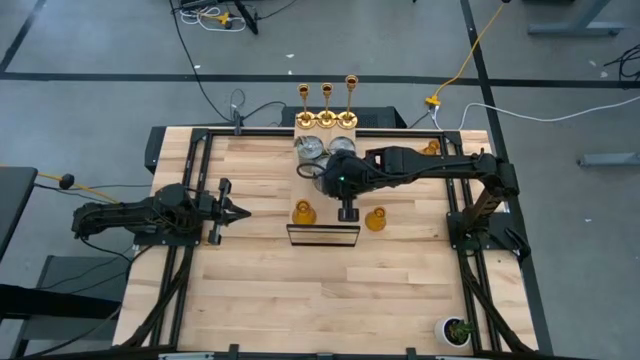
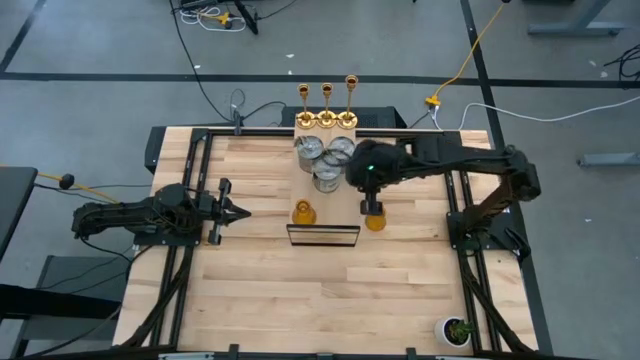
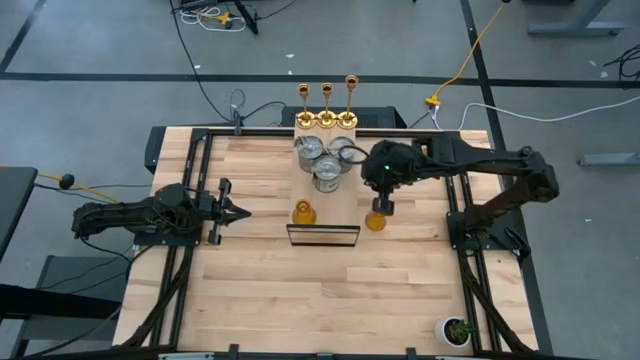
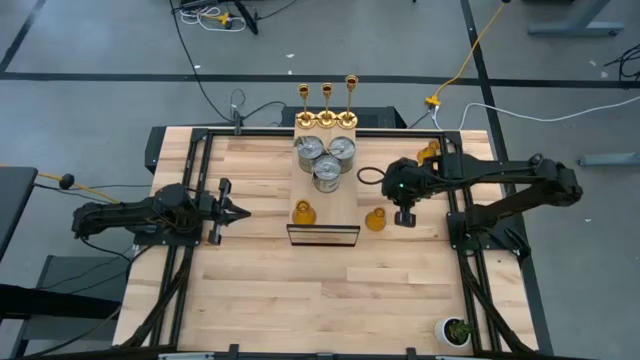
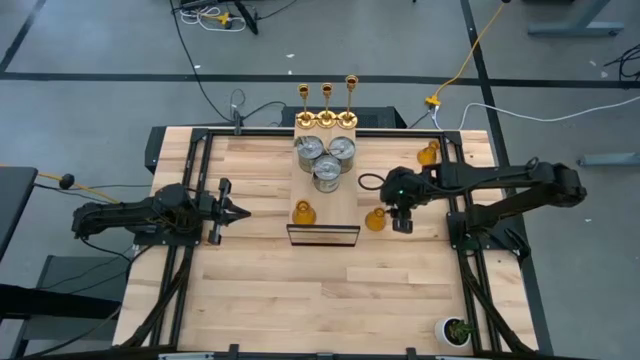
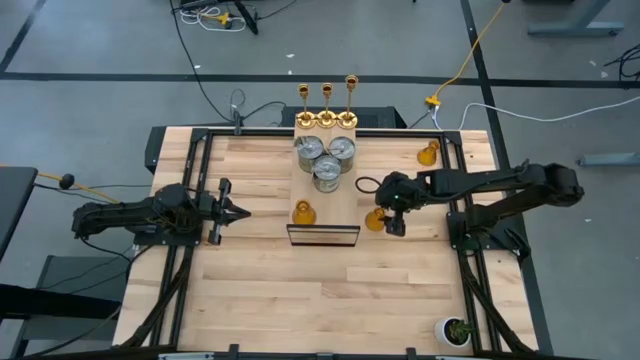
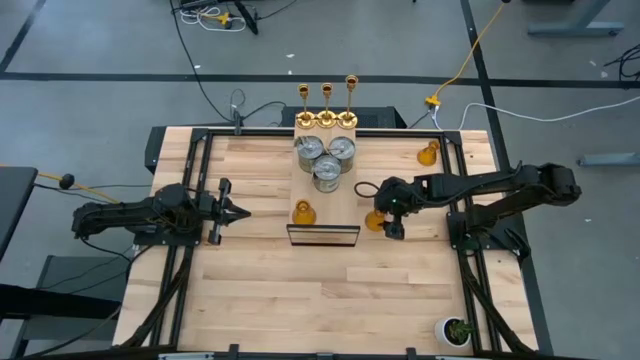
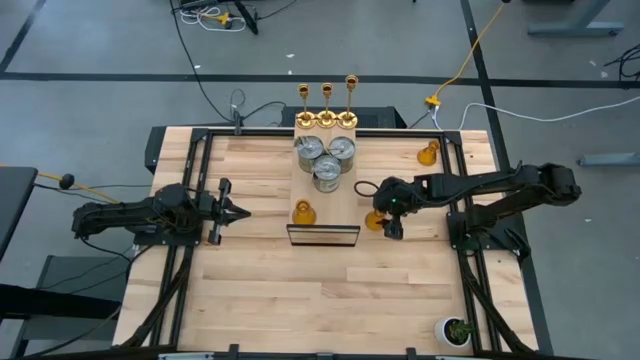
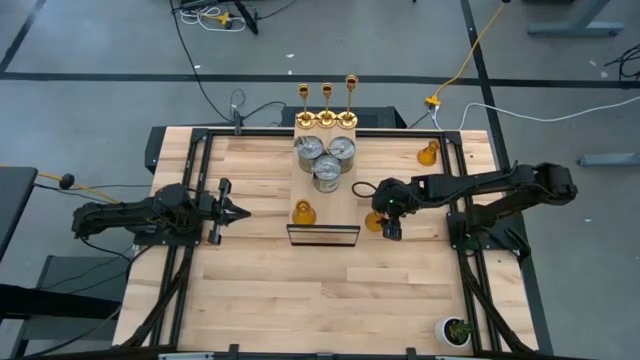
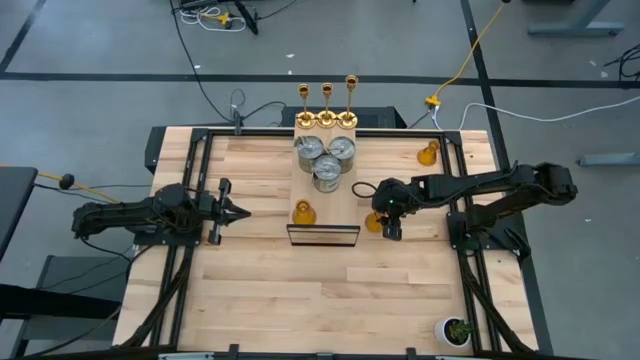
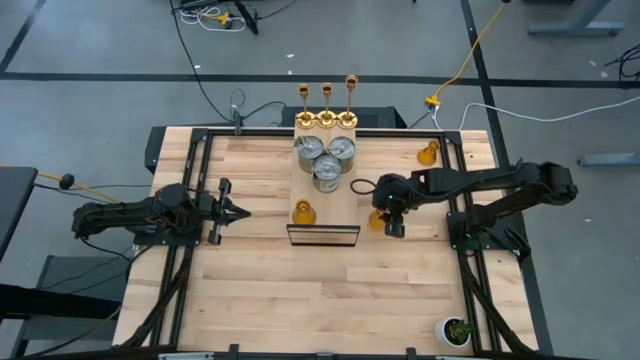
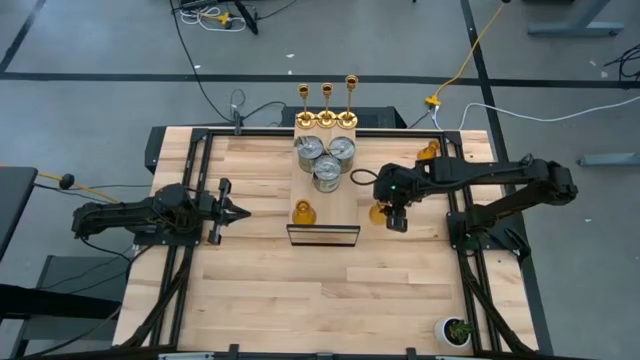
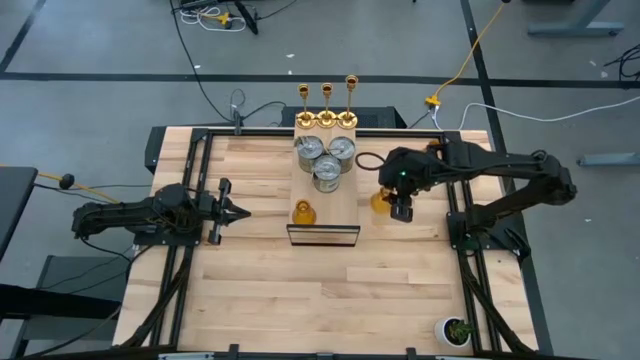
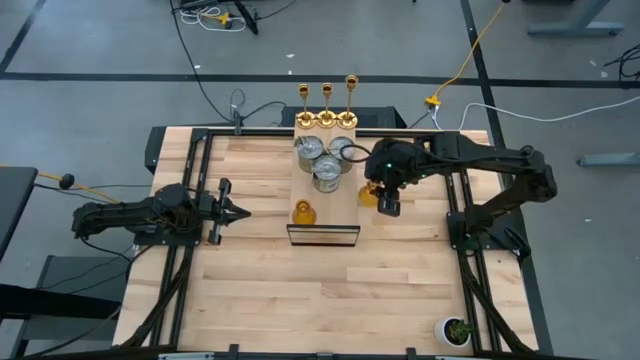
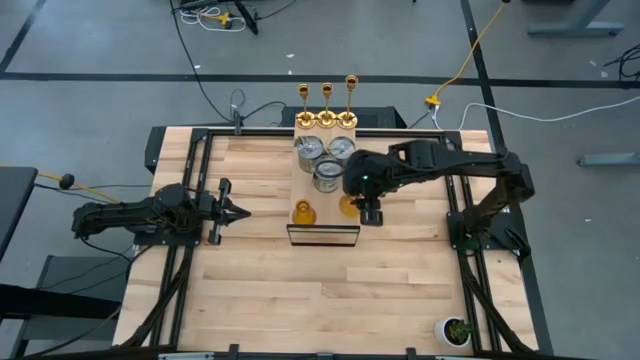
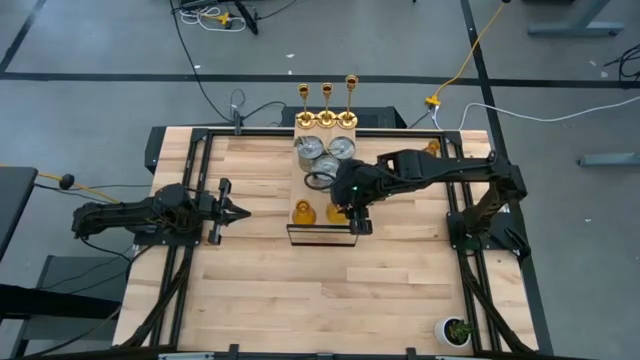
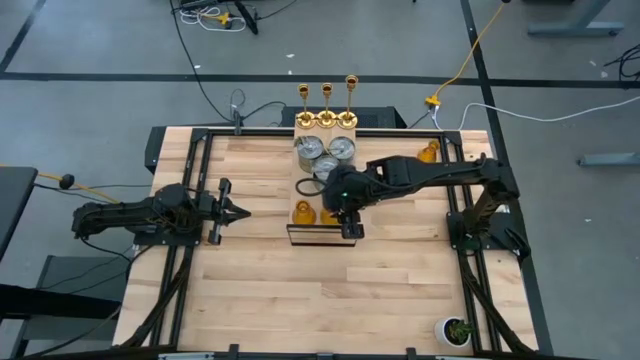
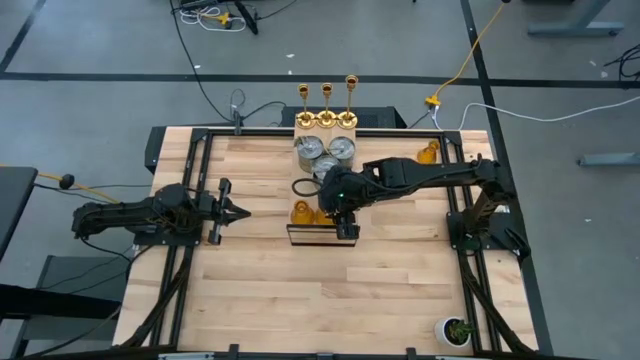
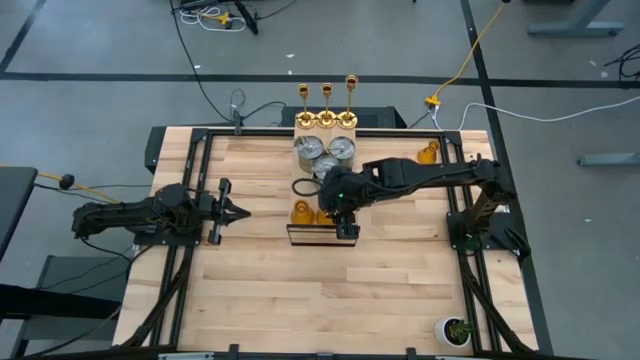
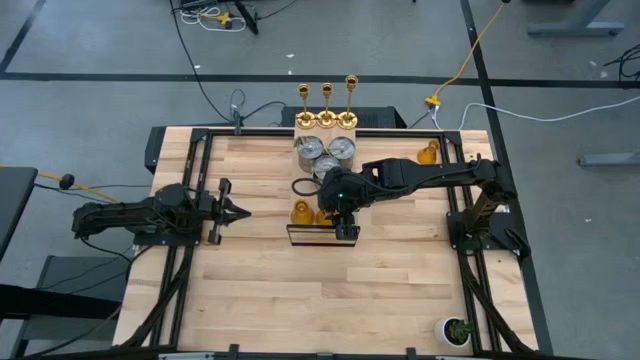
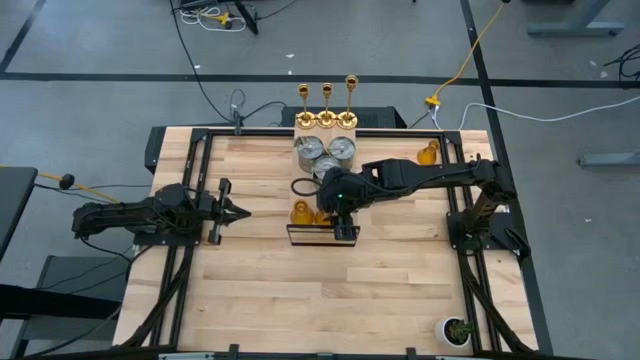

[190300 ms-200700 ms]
Task: Pick & Place candle stick holders
Put the bottom orange glass candle holder aligned with the other glass candle holder on the shelf

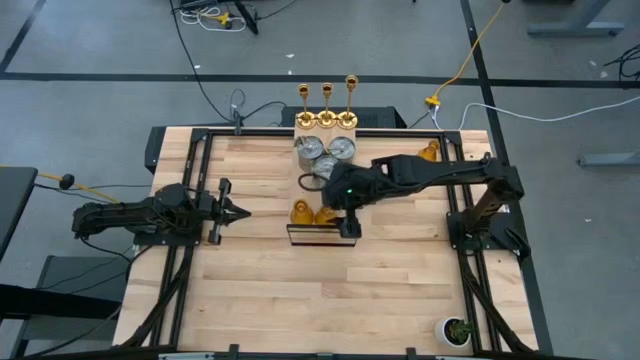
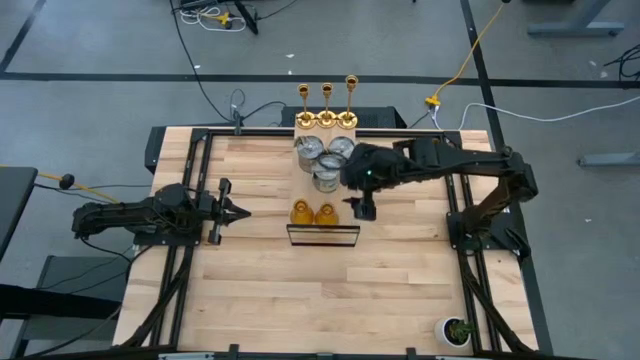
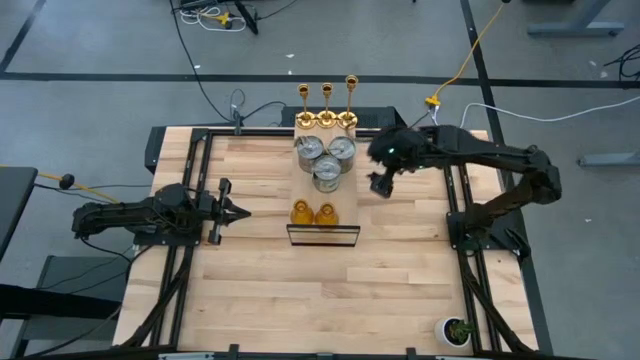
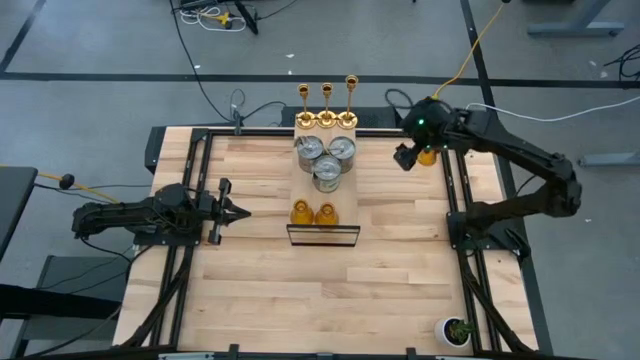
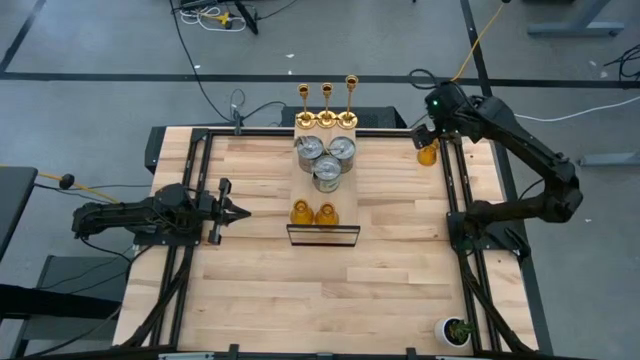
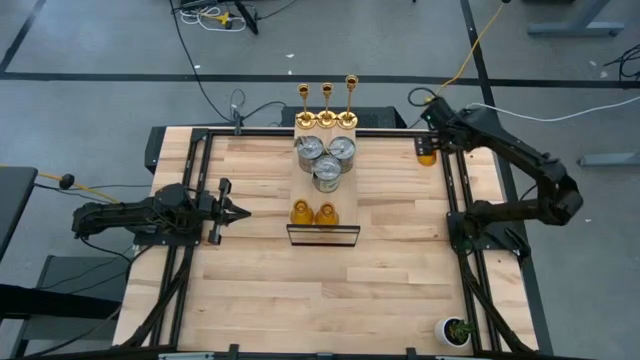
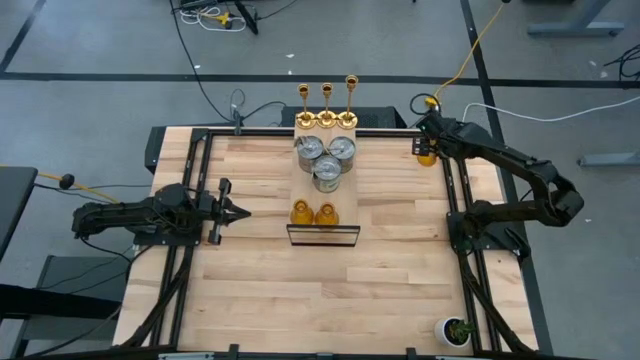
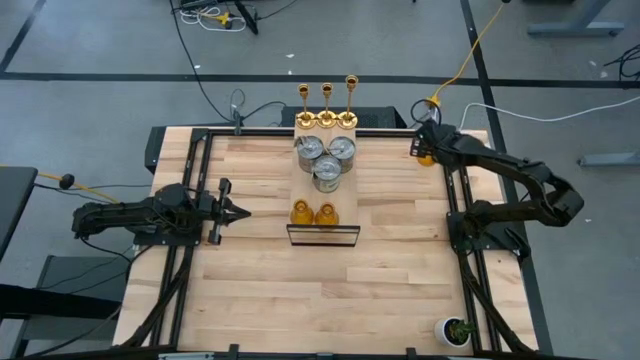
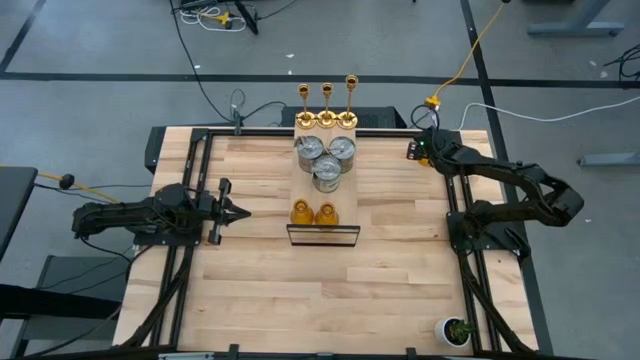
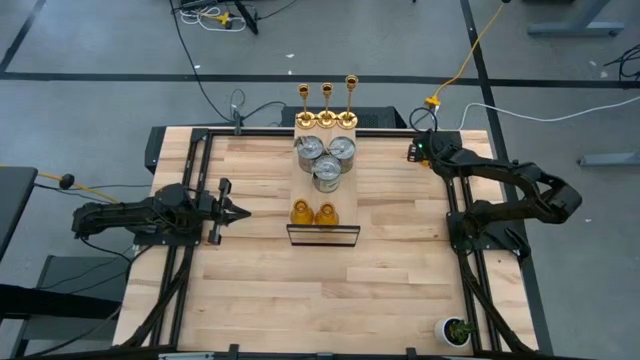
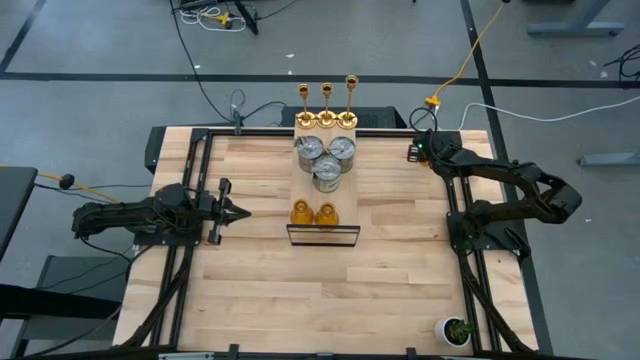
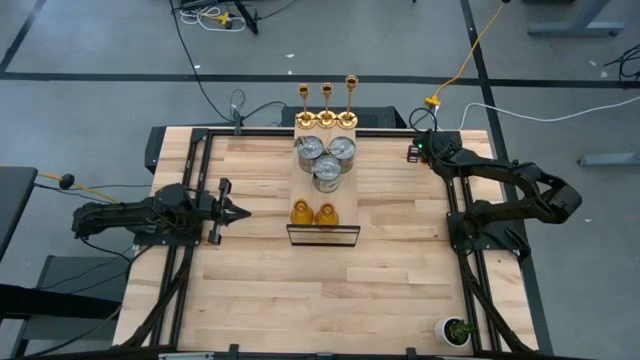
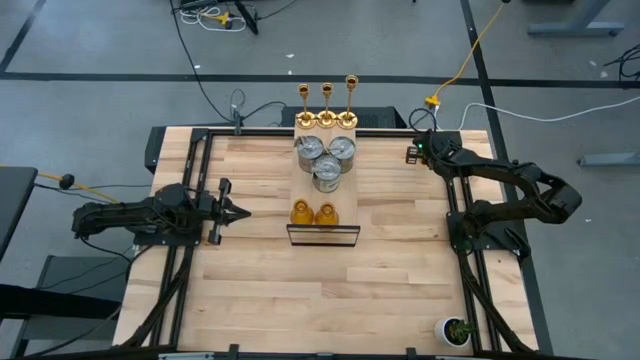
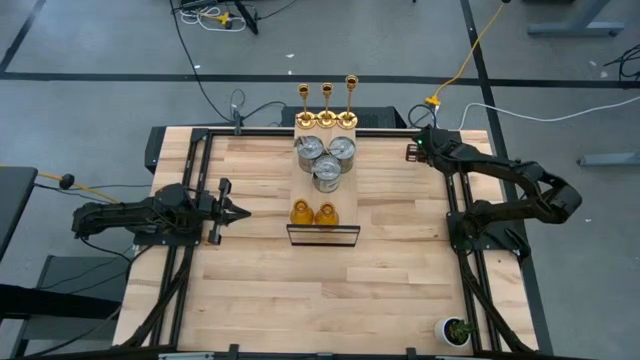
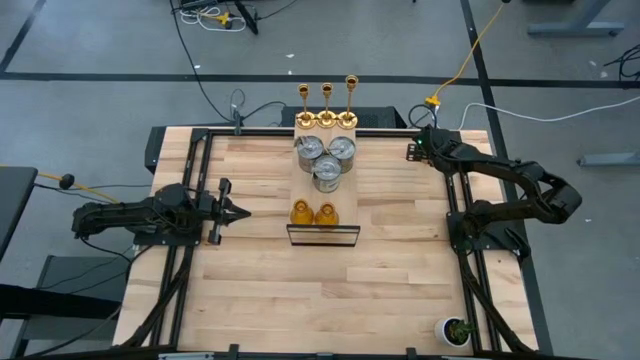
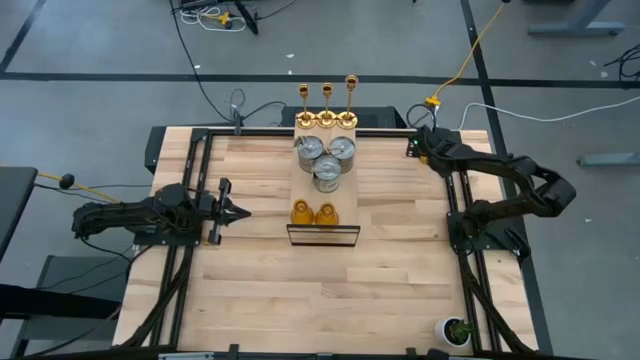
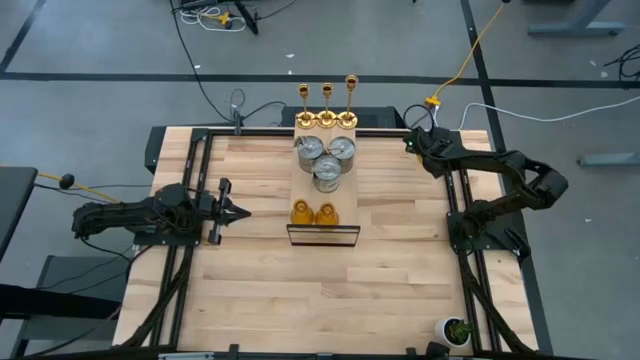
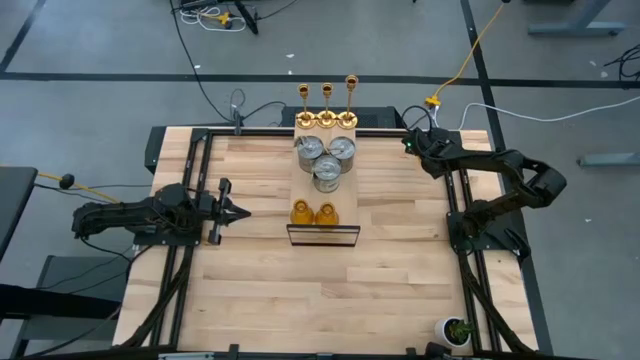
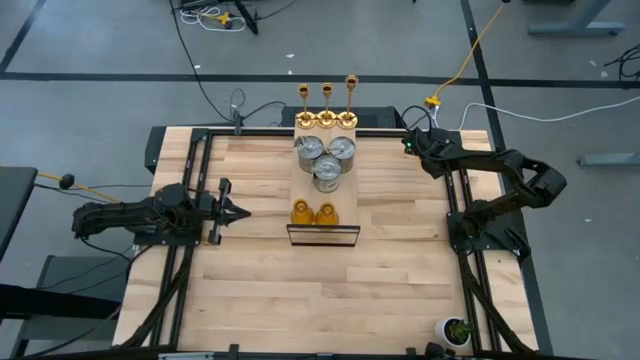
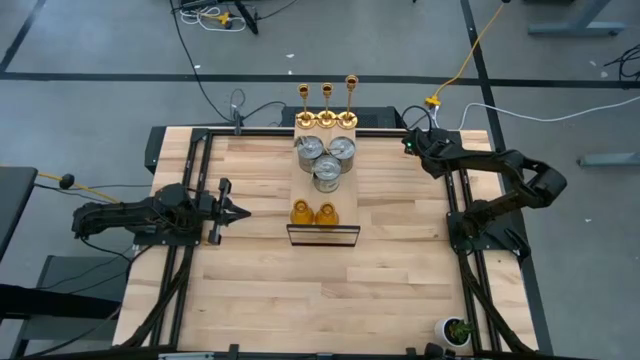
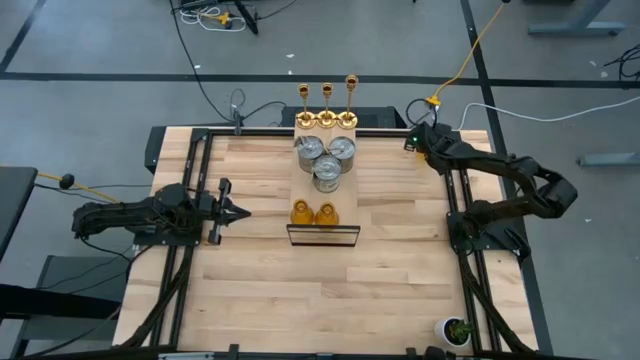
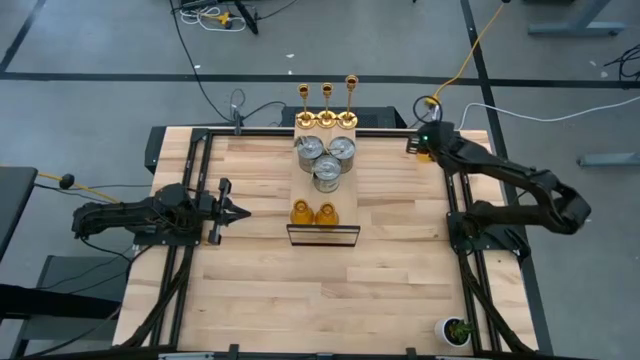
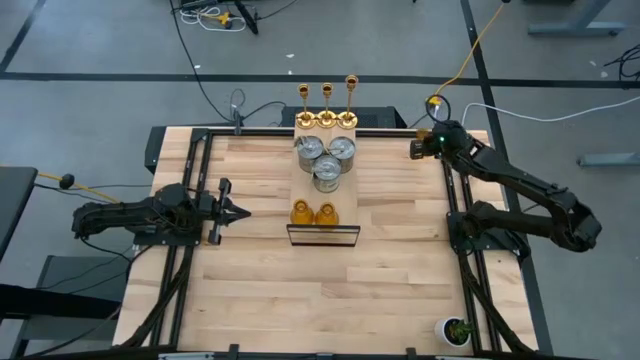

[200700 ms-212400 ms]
Put the orange glass candle holder aligned with the other glass candle holder on the shelf
